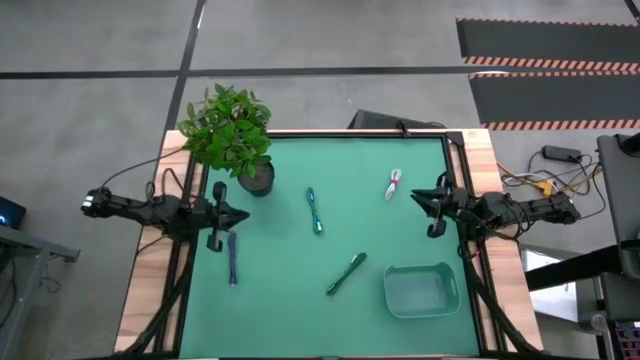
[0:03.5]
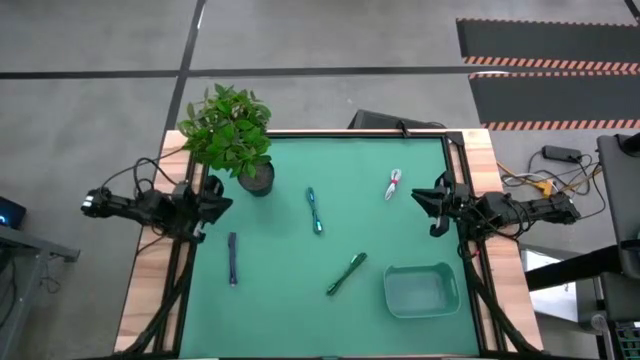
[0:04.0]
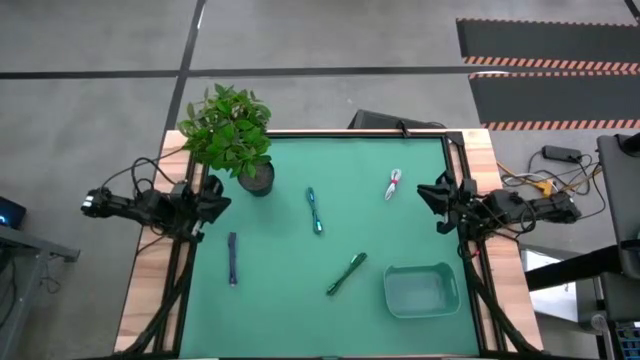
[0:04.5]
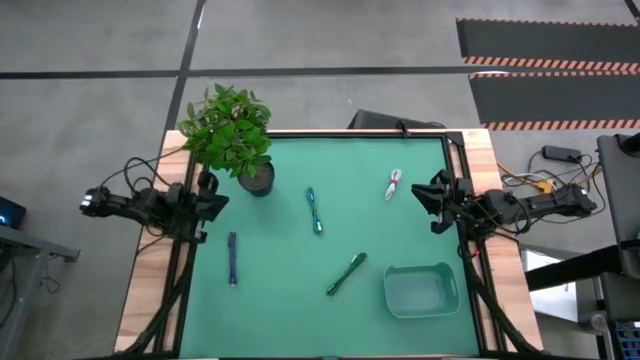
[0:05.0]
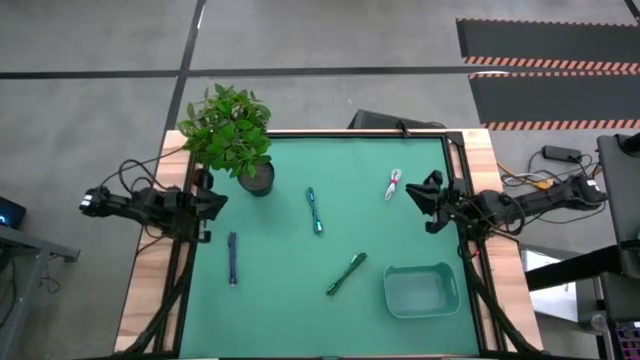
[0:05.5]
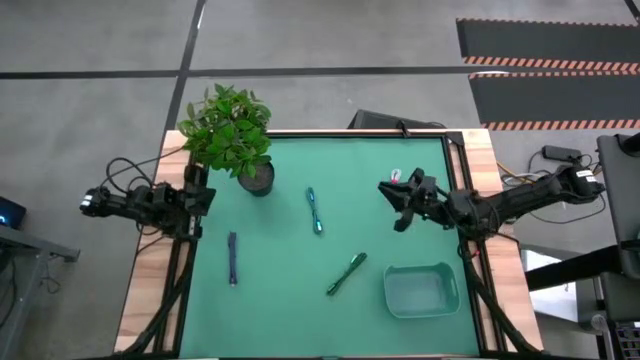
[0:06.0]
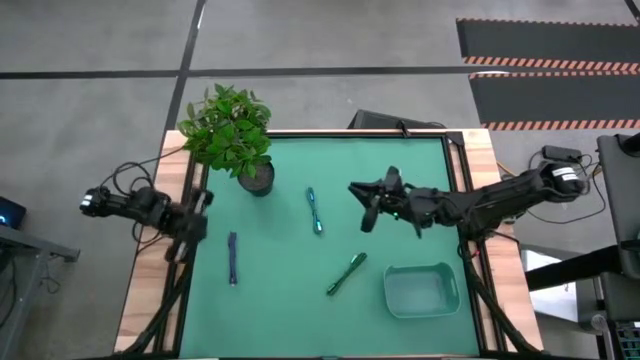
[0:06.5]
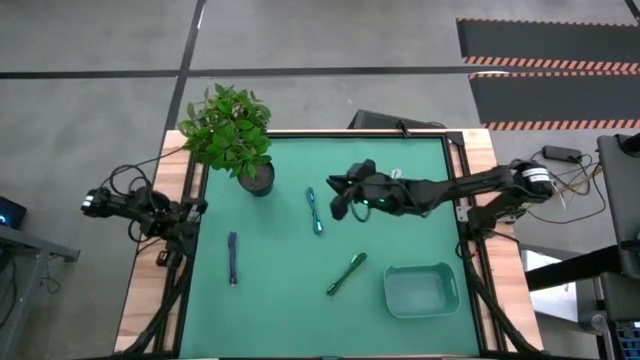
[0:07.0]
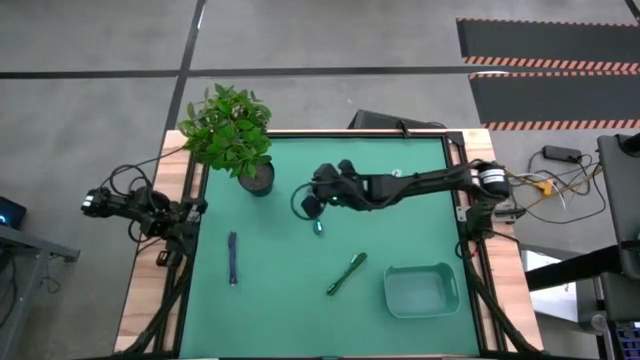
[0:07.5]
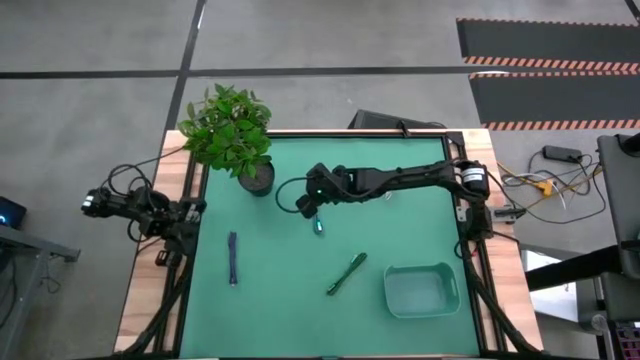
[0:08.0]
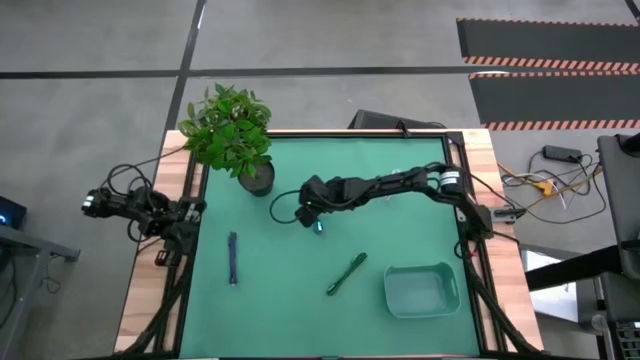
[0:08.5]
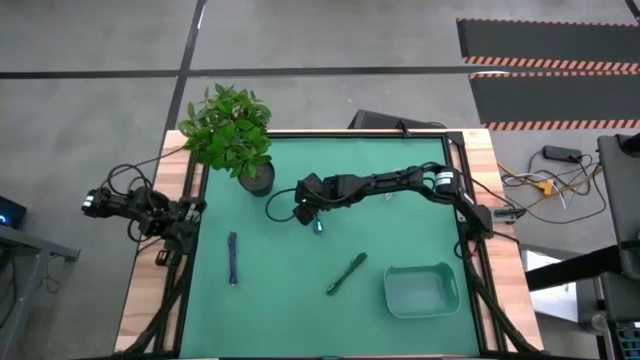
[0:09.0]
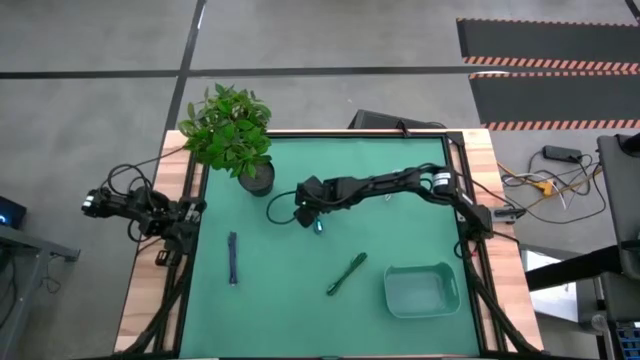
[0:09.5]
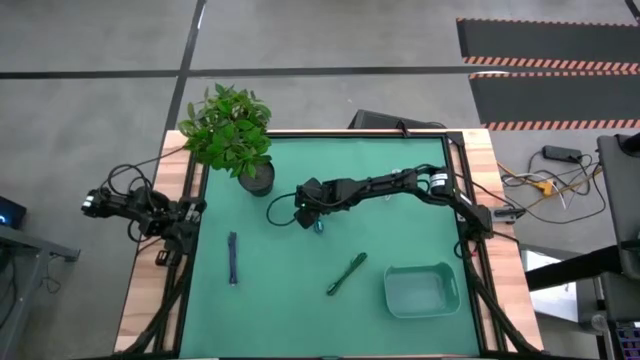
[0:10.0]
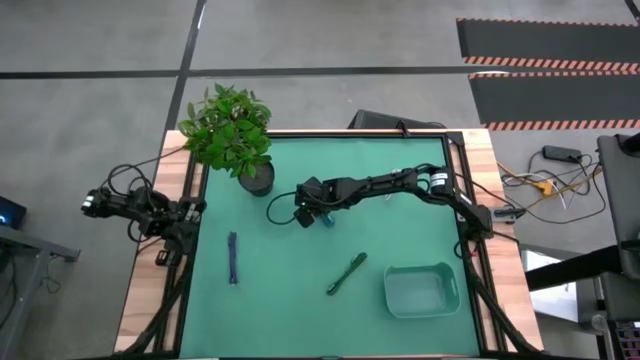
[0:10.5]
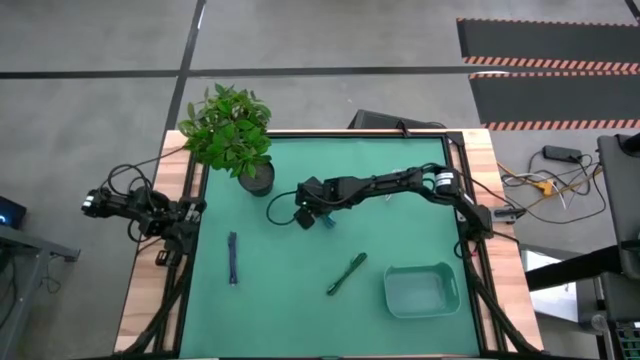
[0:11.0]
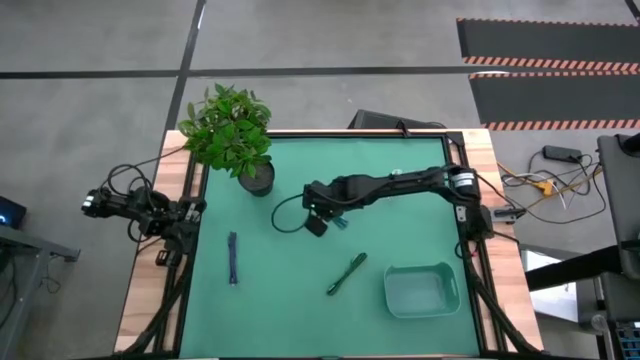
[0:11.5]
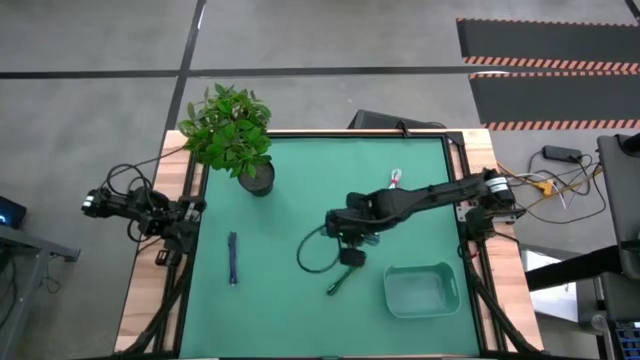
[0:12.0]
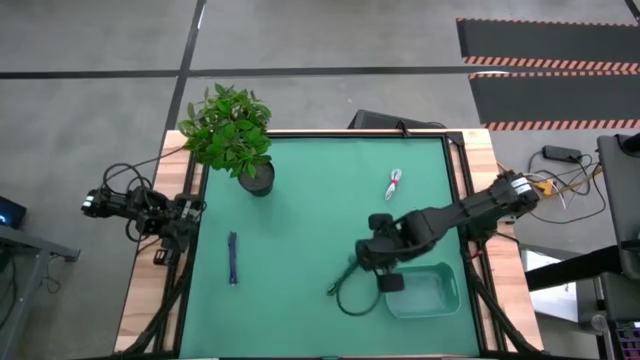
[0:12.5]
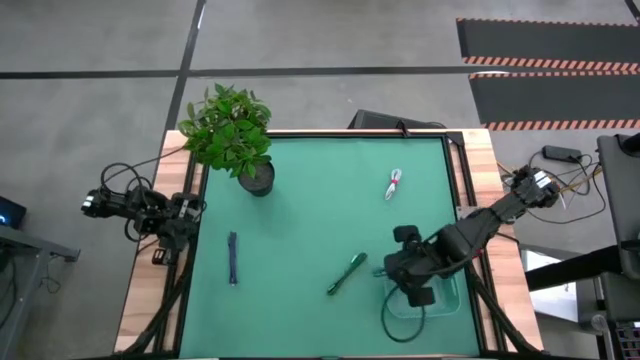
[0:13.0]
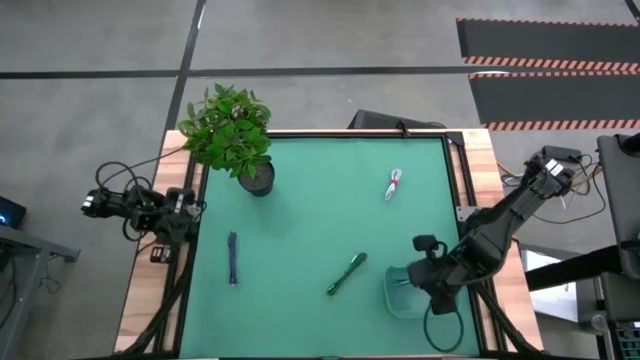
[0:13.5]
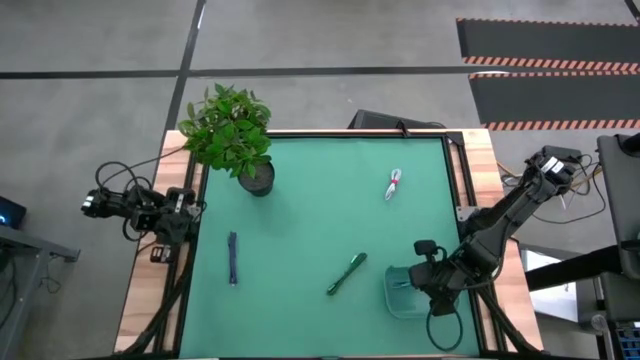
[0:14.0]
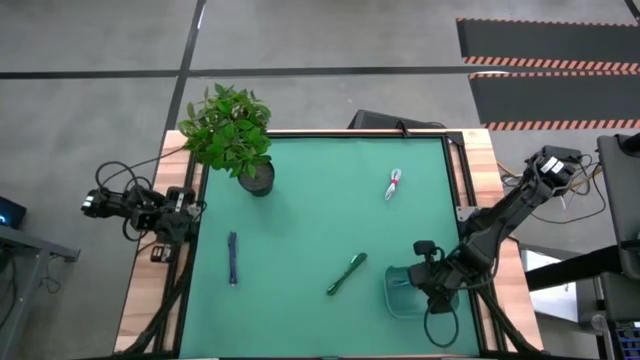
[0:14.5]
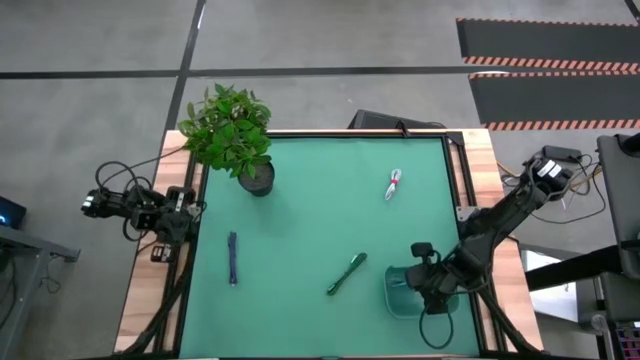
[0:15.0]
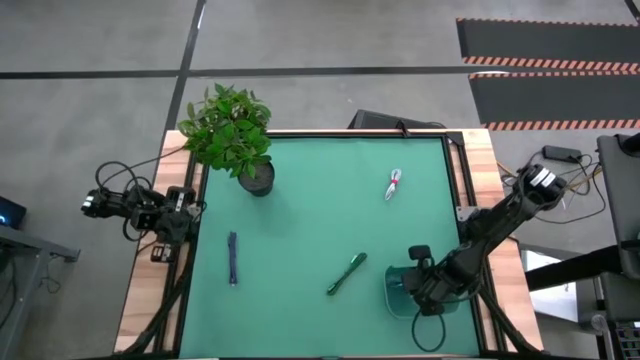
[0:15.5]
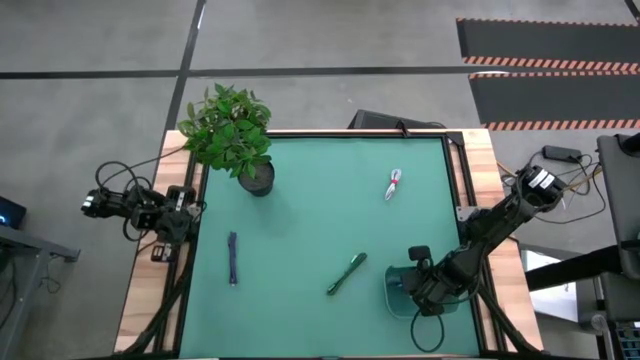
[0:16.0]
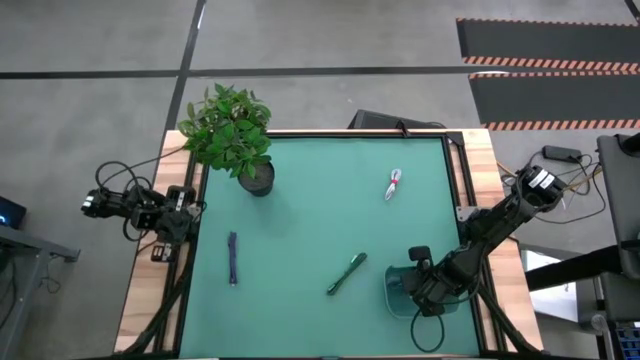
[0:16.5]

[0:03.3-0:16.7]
Task: Pick and place USB-C Cables
Put the black blue charger cable into the green bin

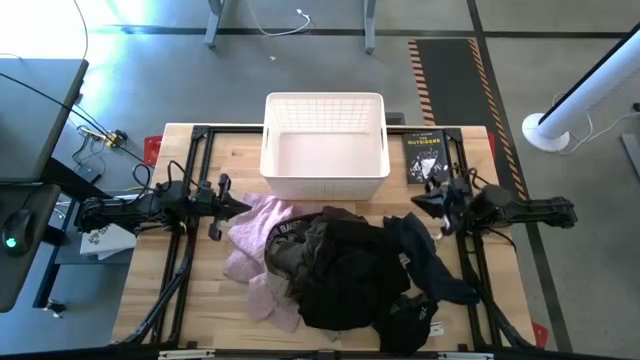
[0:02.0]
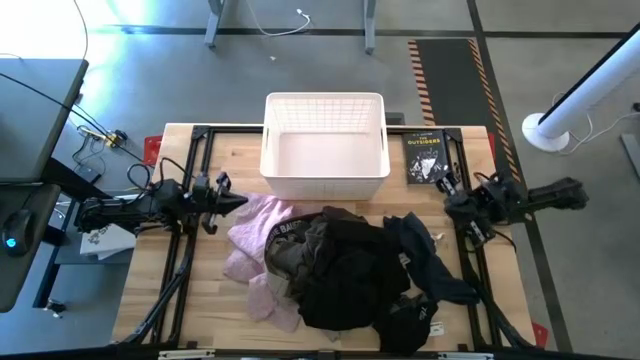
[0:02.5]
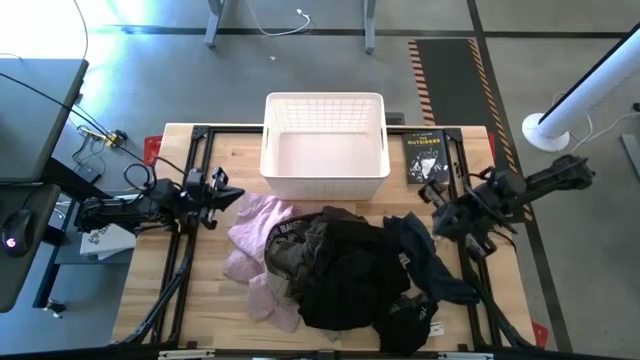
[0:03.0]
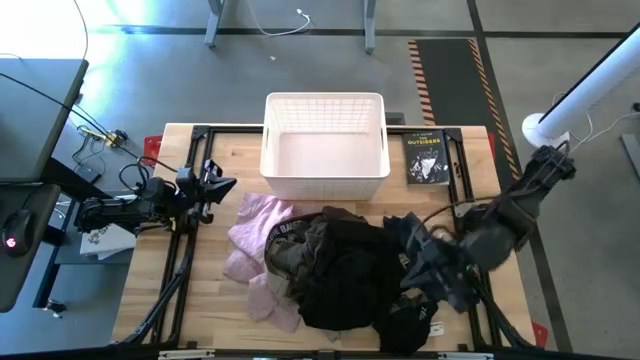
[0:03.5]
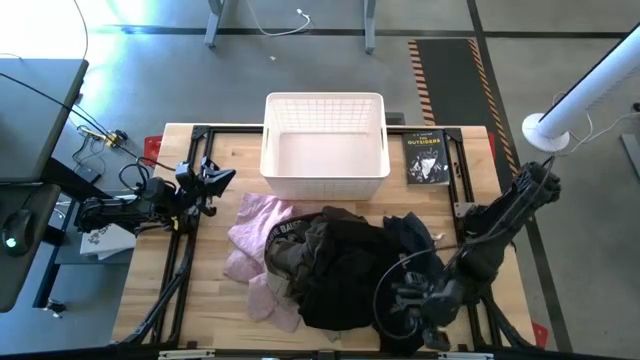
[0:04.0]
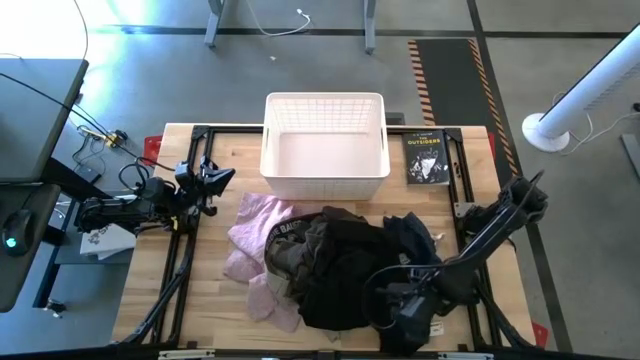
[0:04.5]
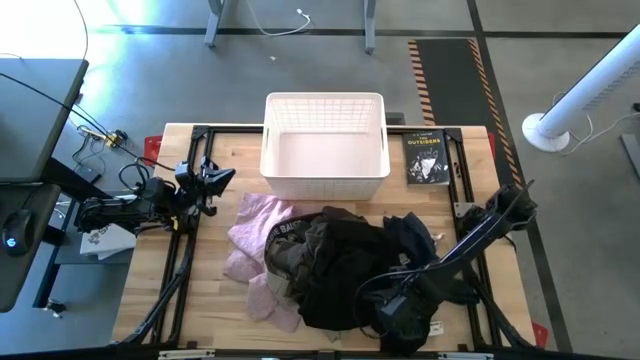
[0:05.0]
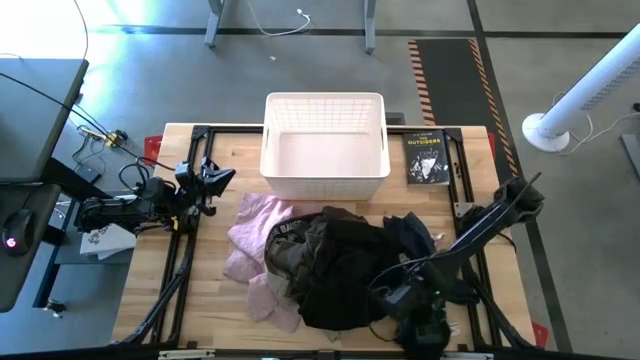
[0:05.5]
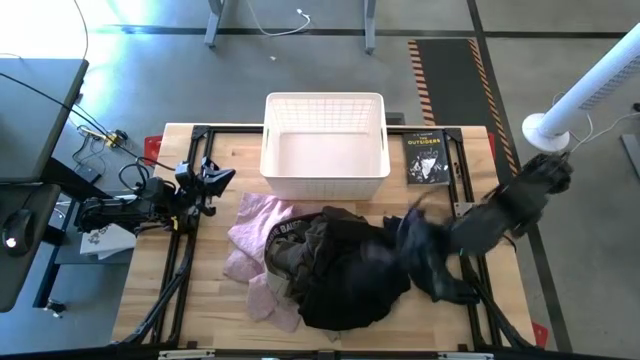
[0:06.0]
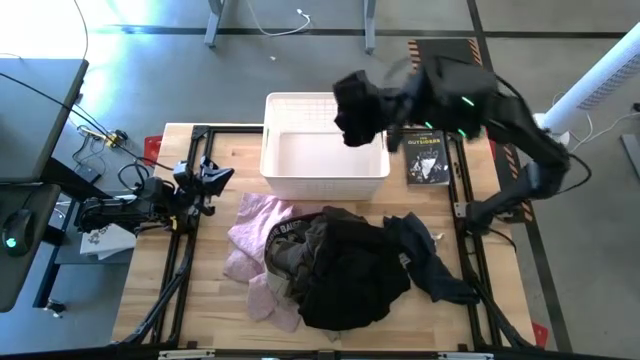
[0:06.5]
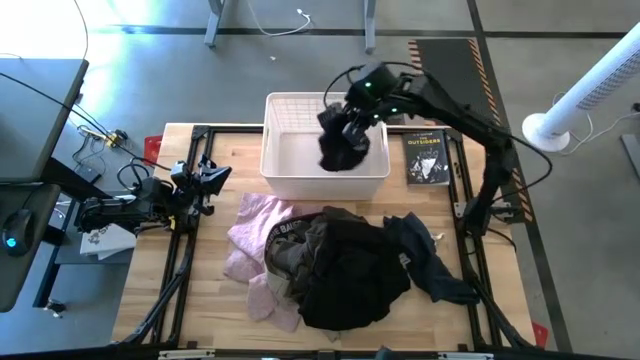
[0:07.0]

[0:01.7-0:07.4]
Task: Sort clothes
Put the black underwear into the white bin
